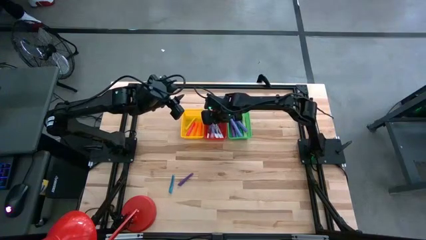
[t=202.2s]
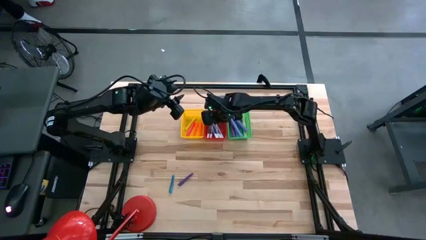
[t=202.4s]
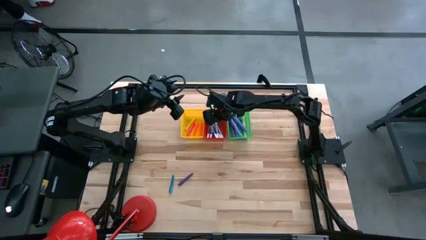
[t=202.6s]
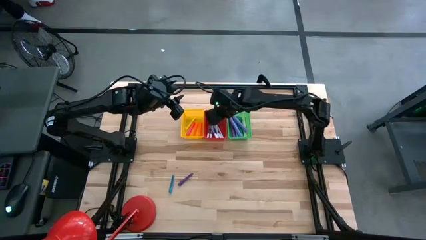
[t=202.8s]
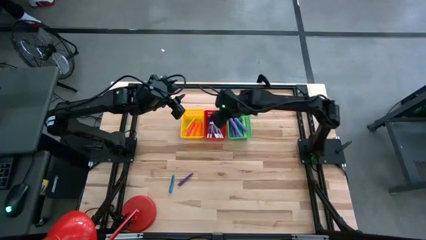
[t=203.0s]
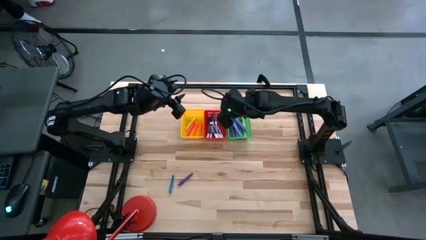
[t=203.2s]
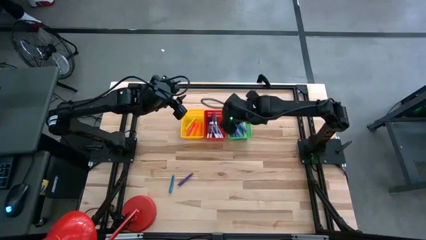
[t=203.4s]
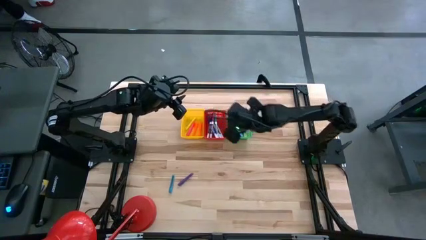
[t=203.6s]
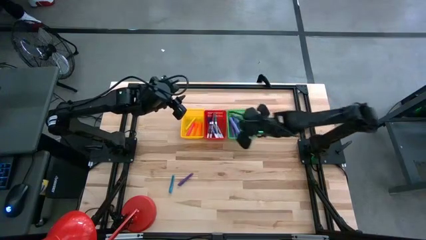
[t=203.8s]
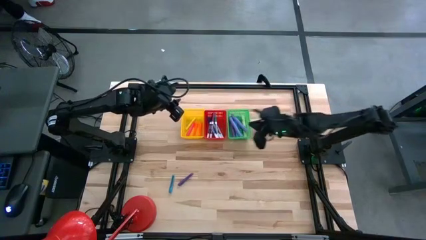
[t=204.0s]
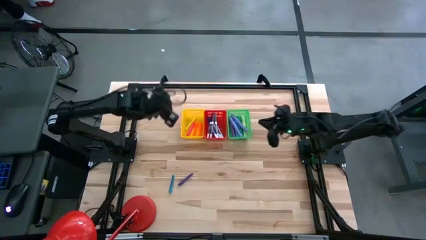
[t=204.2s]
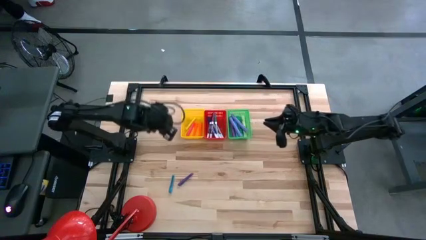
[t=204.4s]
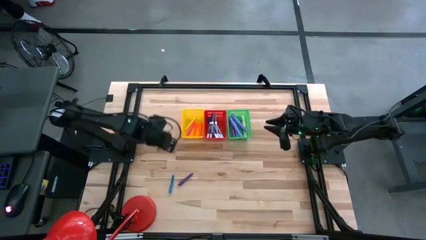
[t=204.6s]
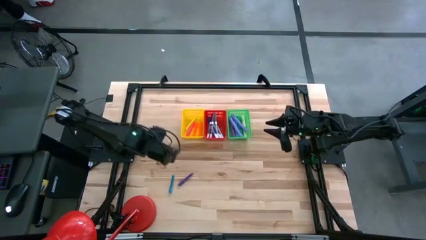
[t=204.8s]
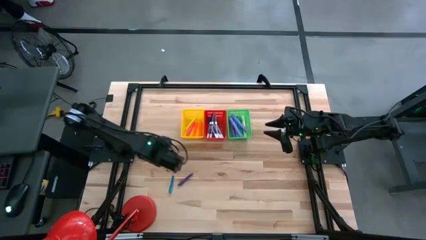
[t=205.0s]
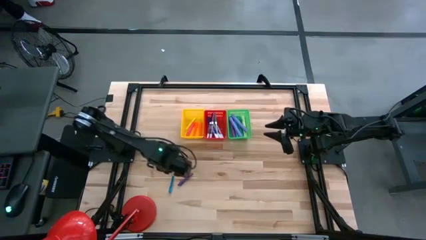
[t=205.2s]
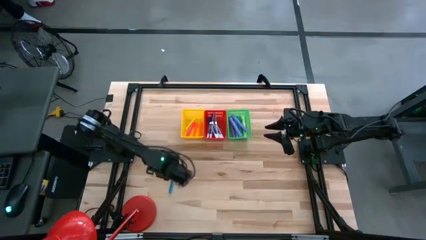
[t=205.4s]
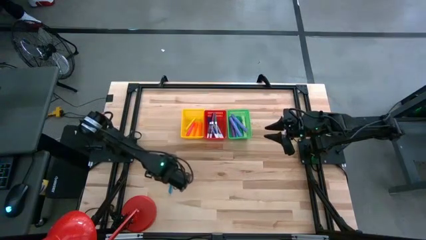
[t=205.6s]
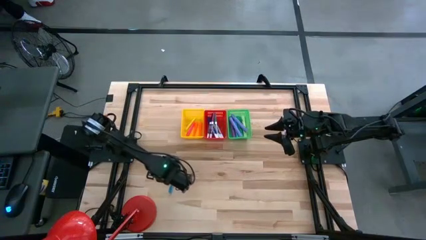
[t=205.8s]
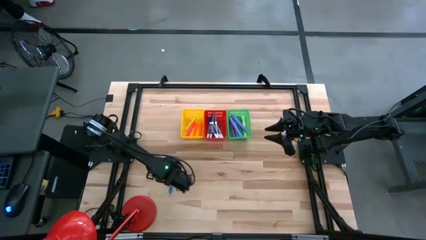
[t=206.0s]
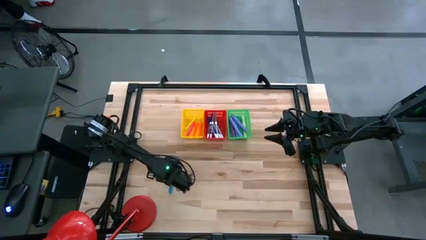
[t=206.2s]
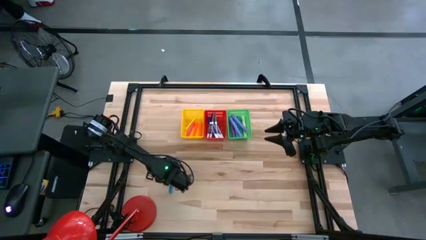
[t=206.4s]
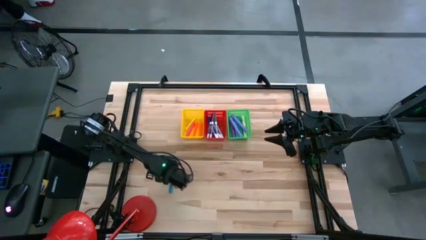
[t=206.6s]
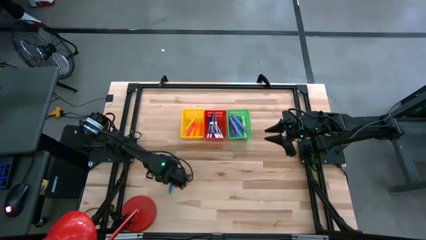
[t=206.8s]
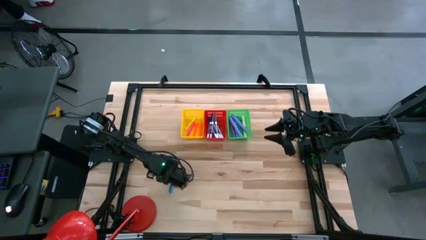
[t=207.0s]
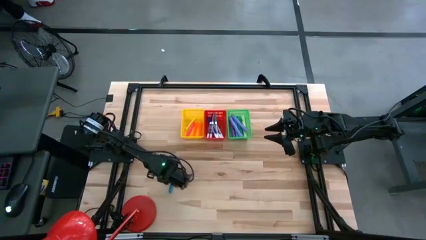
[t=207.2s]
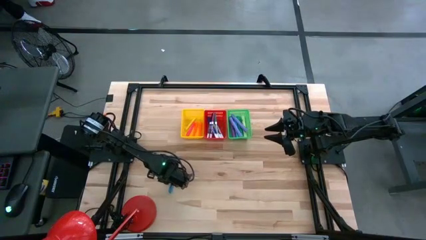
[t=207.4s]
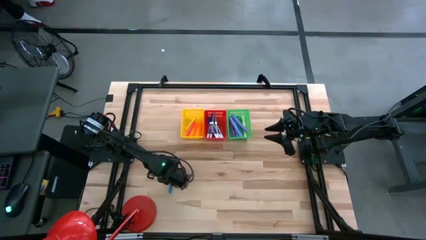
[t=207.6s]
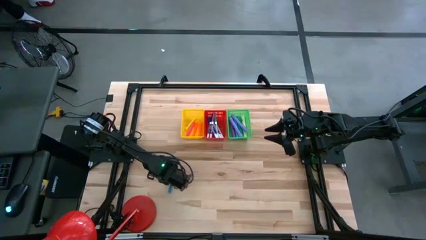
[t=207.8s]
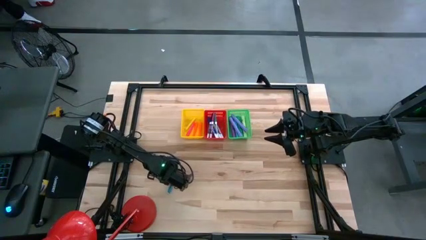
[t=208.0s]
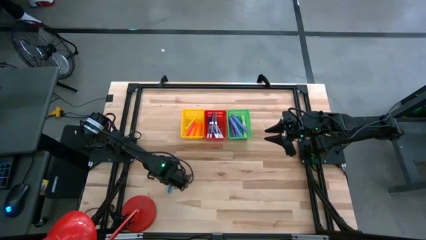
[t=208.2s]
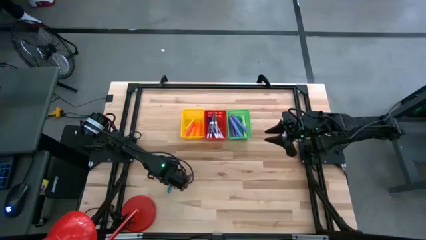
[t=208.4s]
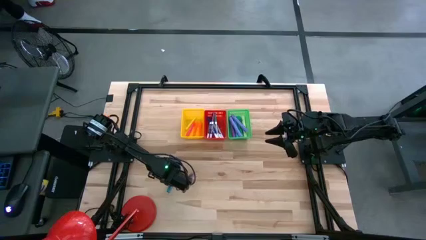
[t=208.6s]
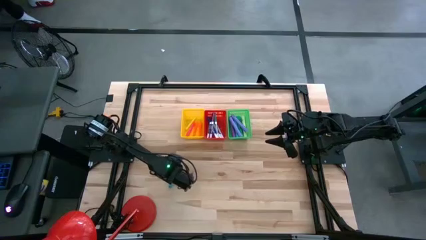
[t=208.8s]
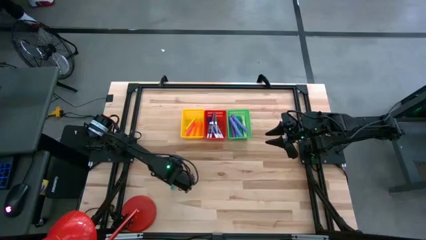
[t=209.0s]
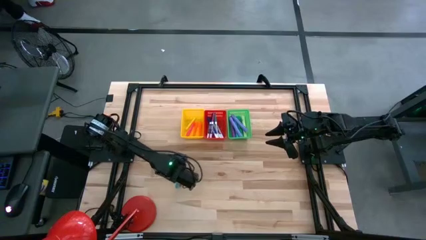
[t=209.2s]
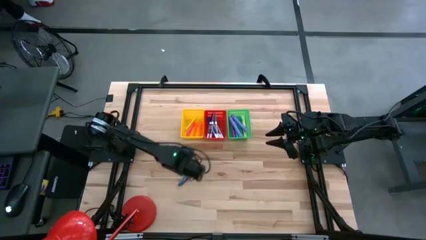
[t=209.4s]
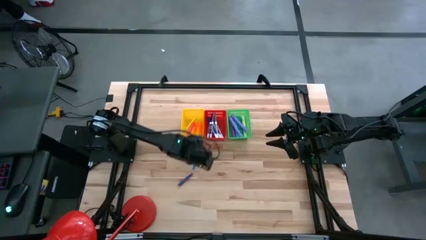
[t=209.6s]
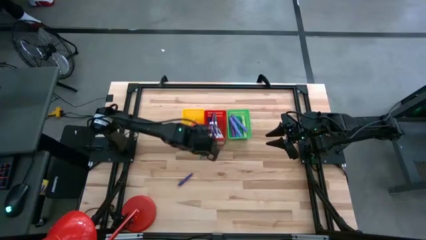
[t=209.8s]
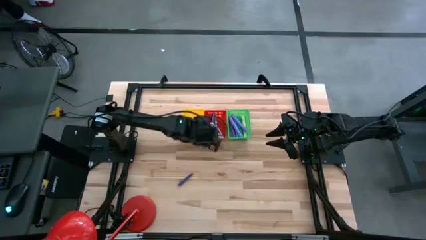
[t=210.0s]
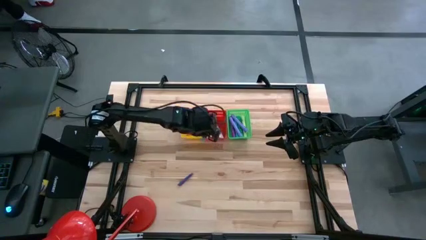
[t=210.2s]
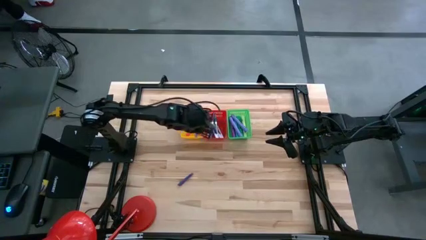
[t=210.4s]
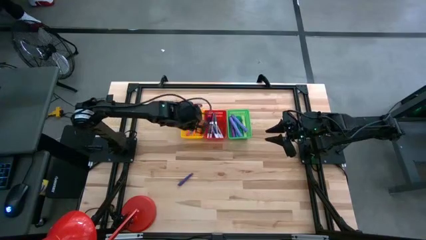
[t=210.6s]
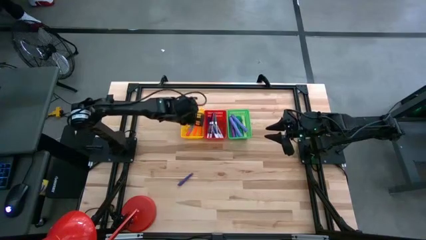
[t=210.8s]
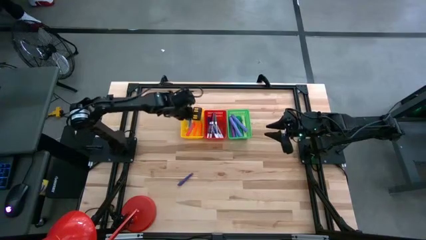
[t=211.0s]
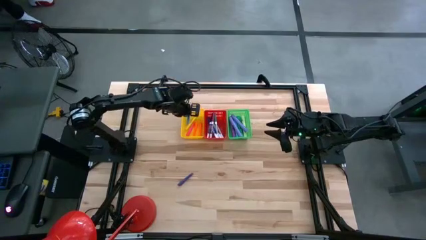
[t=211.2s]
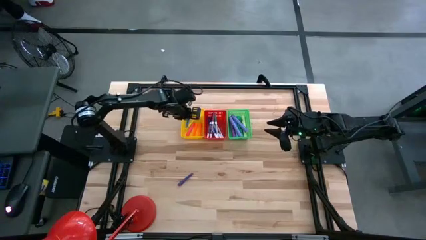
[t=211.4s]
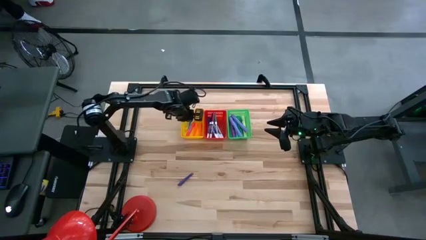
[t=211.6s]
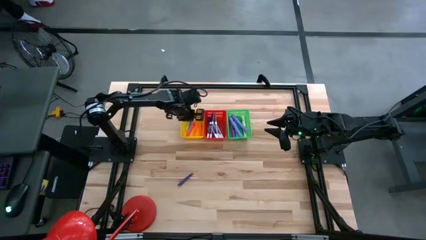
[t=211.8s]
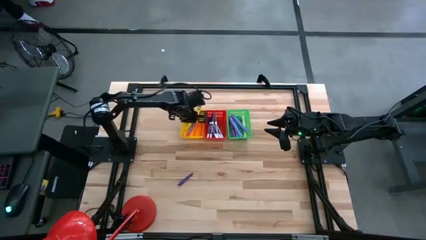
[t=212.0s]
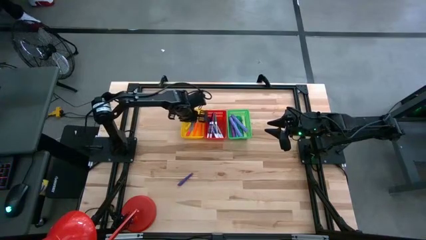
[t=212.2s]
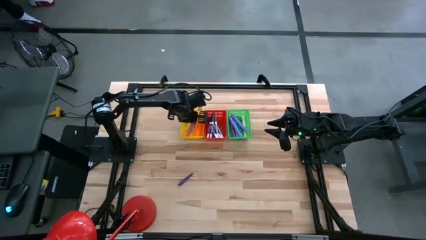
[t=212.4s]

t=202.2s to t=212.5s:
Task: Pick & Place Markers
Put the blue pen into the yellow bin

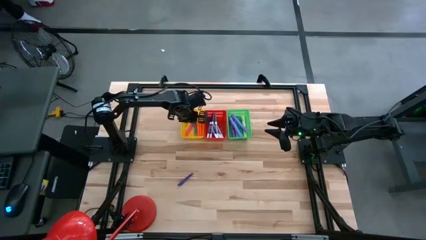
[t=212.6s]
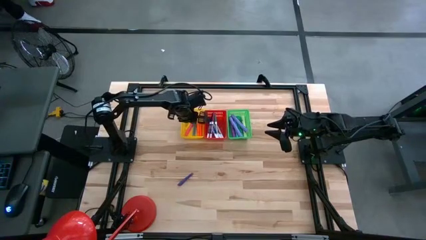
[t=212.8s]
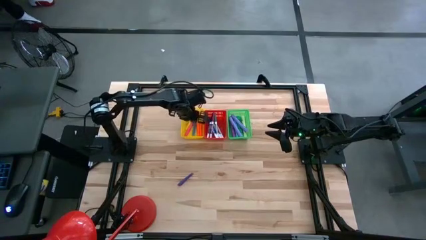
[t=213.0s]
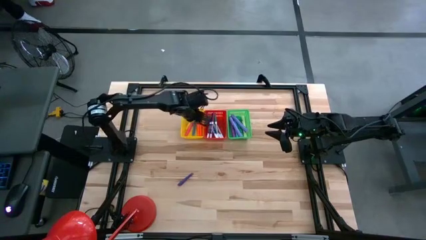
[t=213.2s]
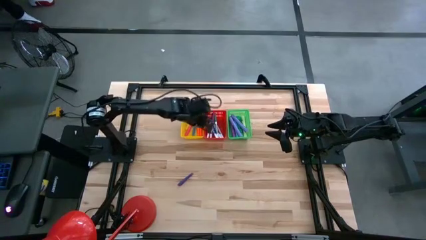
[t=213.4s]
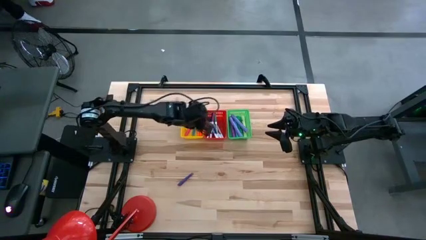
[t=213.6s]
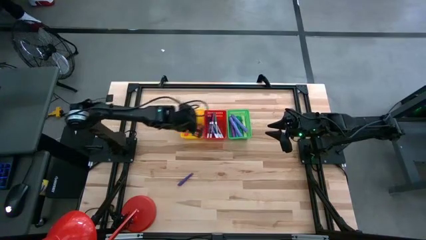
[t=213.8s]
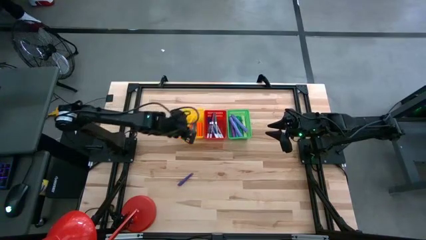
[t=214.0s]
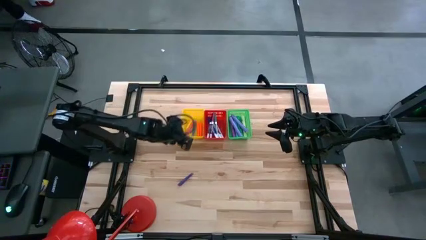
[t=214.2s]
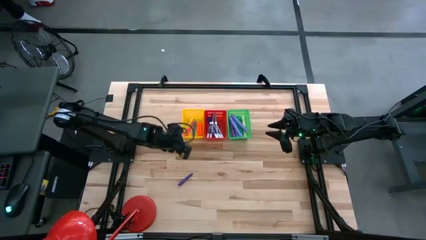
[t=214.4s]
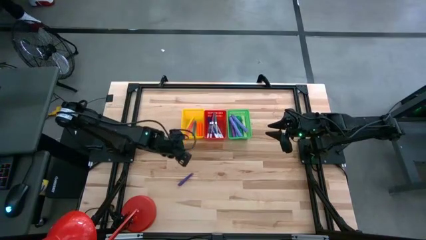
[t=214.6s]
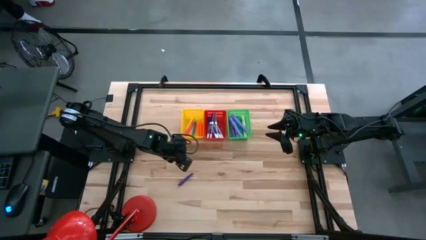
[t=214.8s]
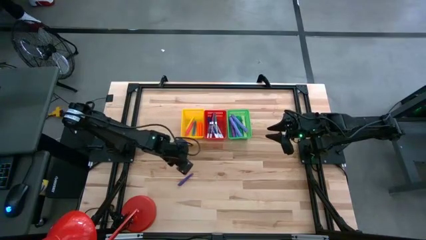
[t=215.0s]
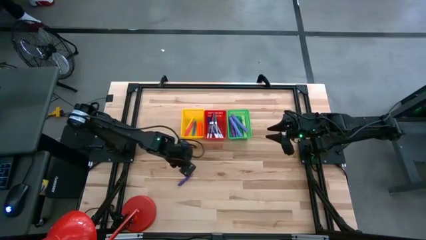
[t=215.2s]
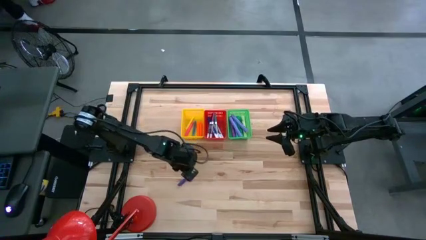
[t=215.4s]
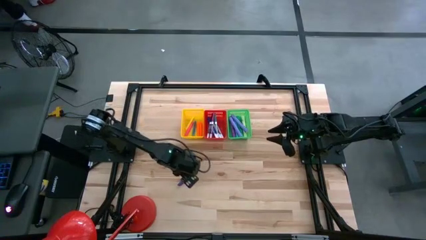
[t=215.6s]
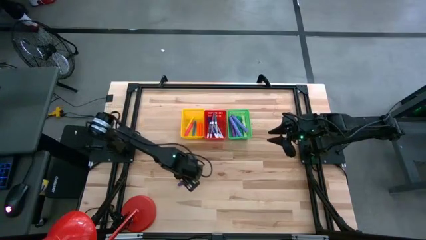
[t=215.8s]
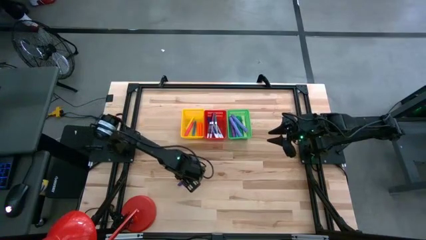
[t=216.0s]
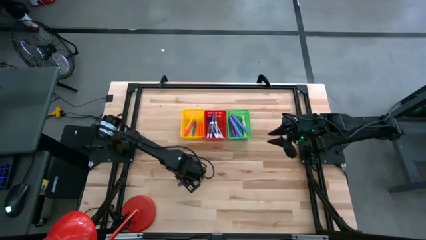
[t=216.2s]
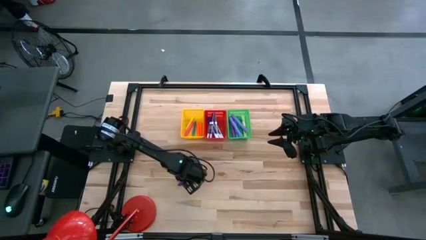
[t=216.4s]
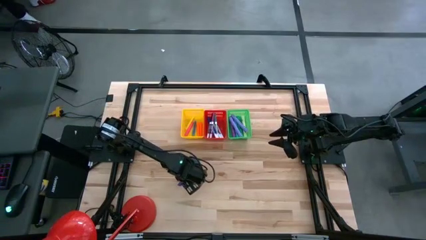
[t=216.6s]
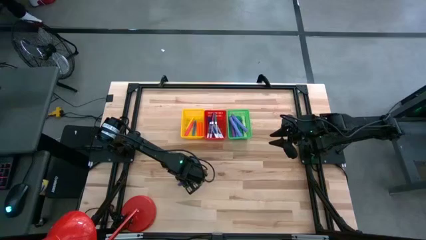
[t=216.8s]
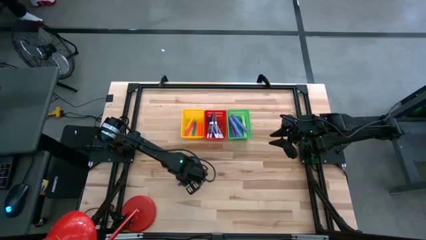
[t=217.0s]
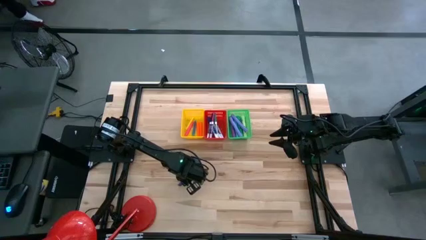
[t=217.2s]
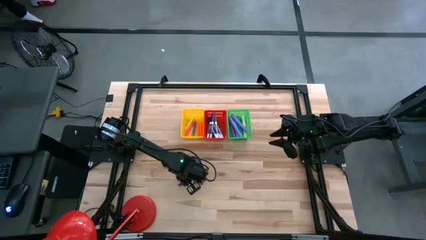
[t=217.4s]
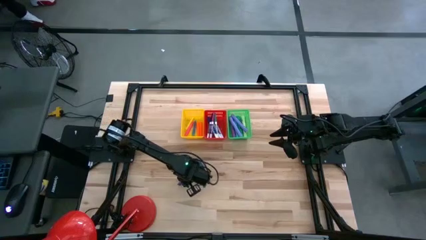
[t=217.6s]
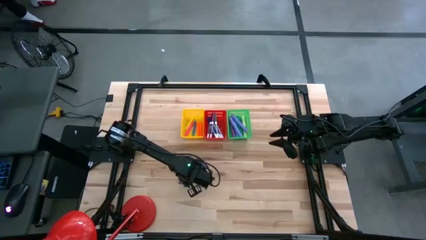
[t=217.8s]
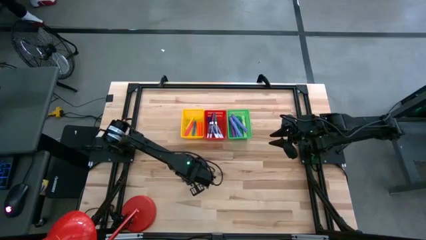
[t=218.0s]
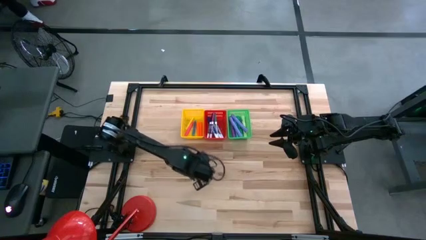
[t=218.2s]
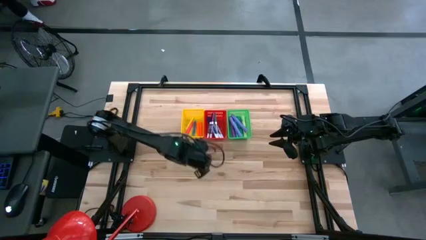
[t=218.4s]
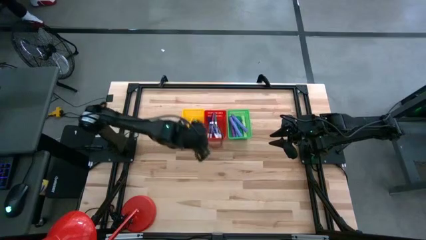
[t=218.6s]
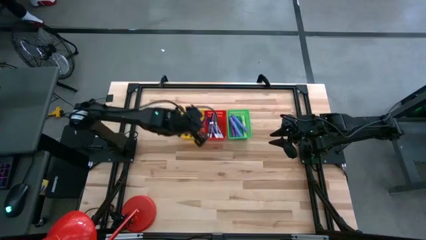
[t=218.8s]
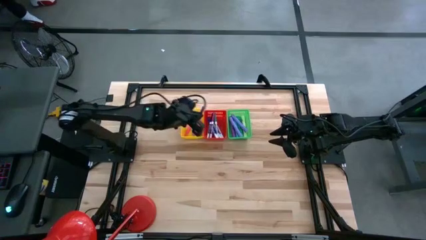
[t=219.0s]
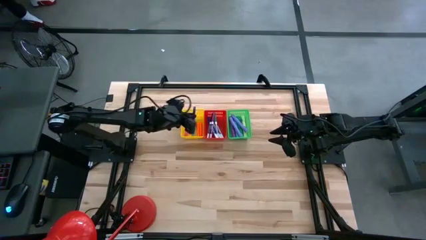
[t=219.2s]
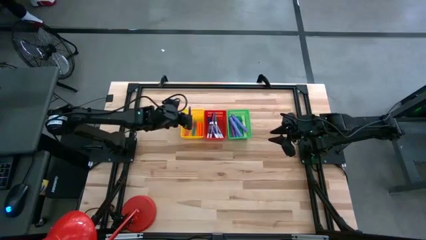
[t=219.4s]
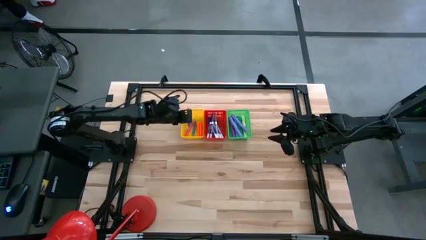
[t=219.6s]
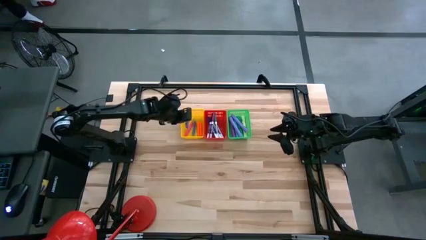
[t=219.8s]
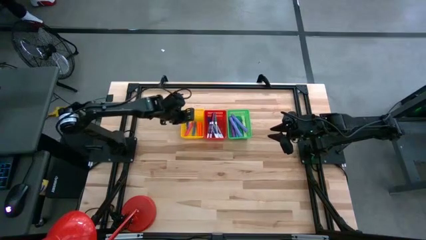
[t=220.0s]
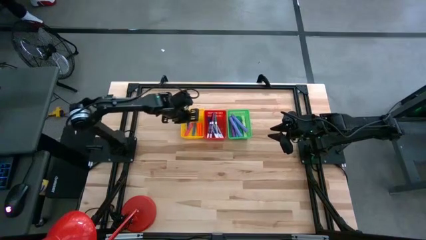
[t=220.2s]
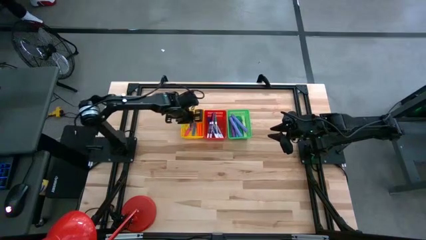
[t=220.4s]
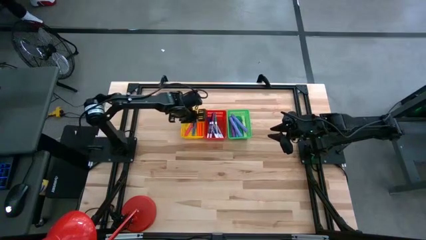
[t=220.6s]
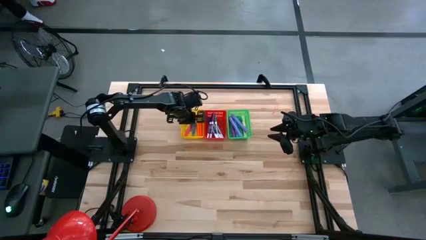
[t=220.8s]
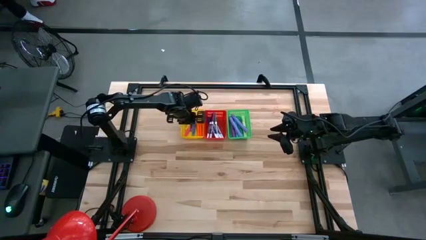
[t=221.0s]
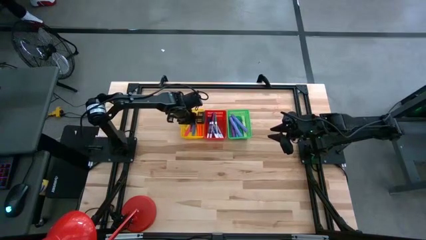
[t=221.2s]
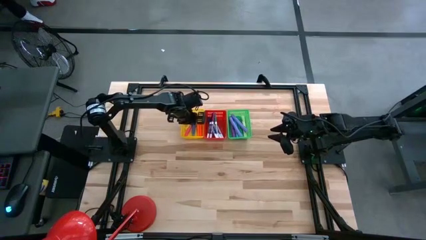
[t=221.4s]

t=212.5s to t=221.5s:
Put the purple pen into the yellow bin
